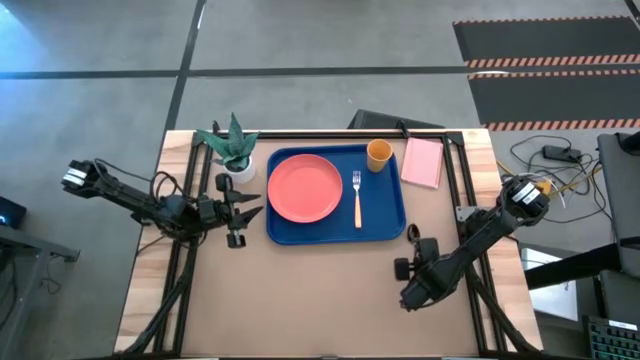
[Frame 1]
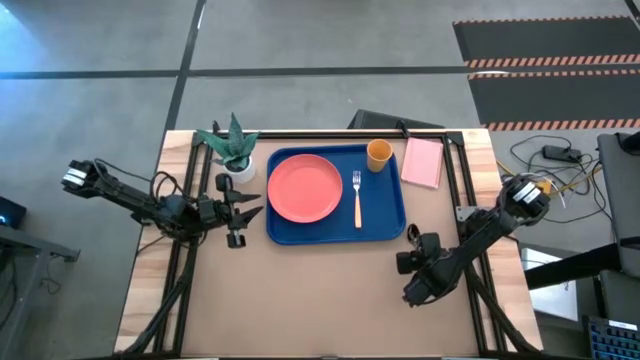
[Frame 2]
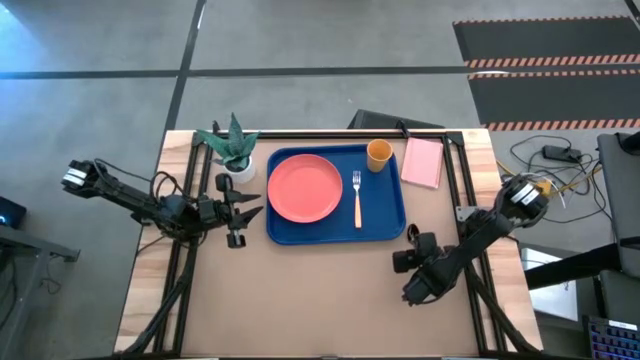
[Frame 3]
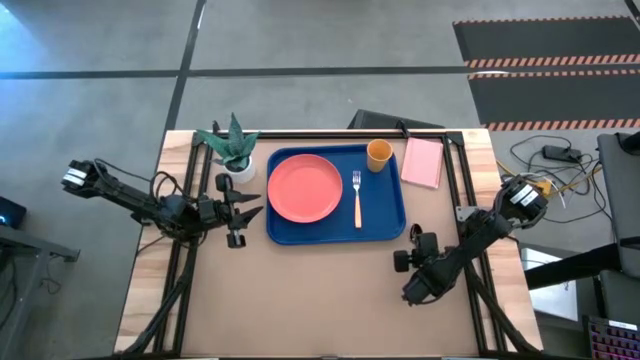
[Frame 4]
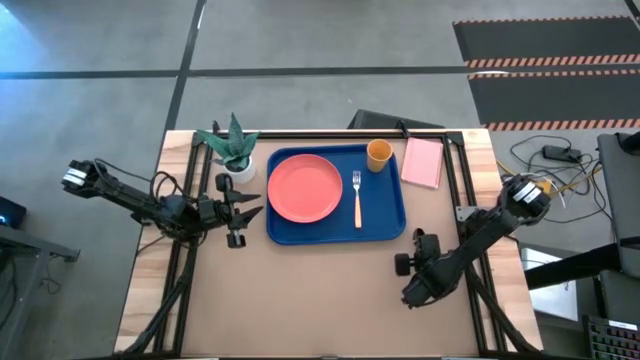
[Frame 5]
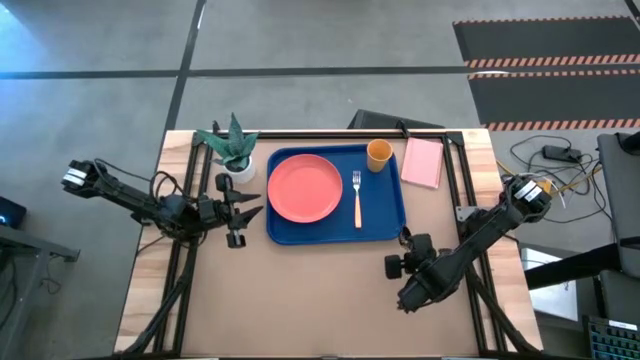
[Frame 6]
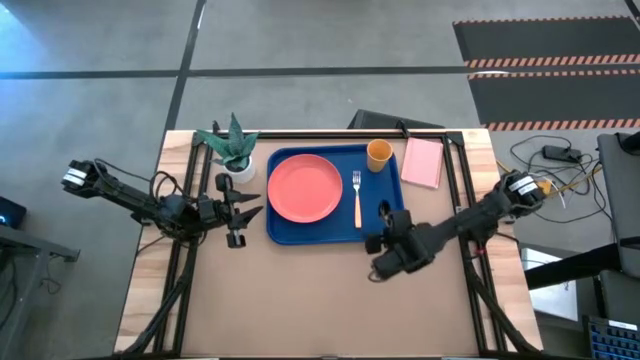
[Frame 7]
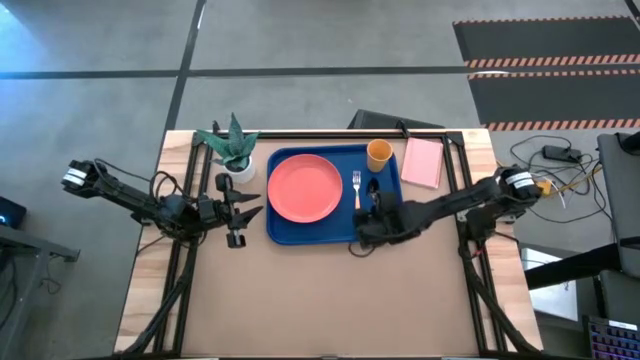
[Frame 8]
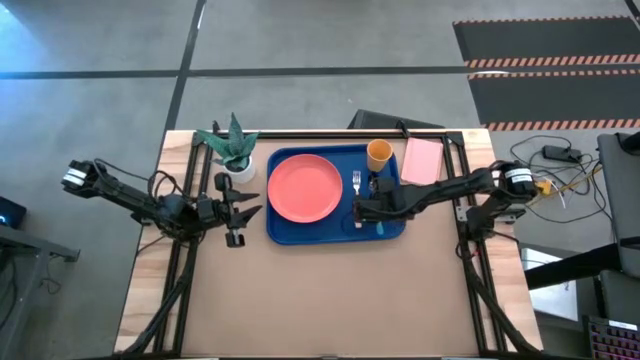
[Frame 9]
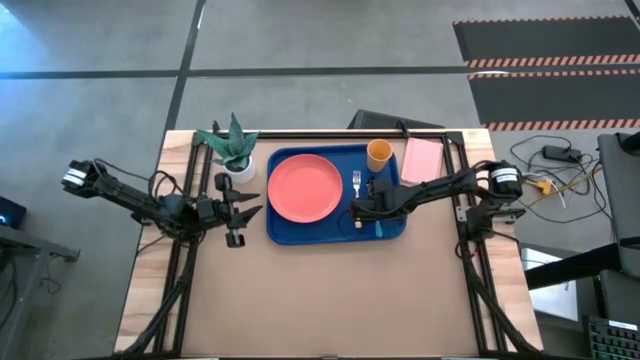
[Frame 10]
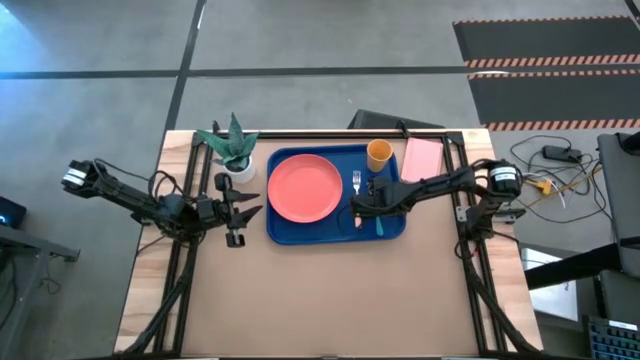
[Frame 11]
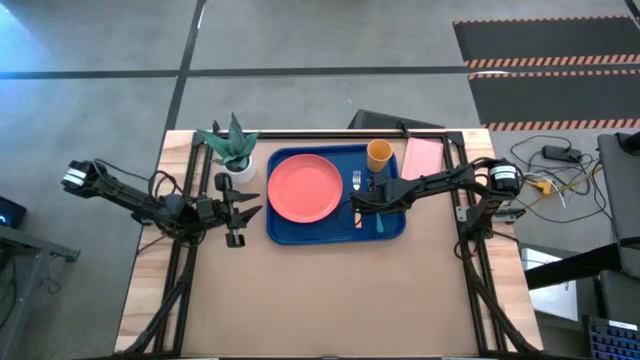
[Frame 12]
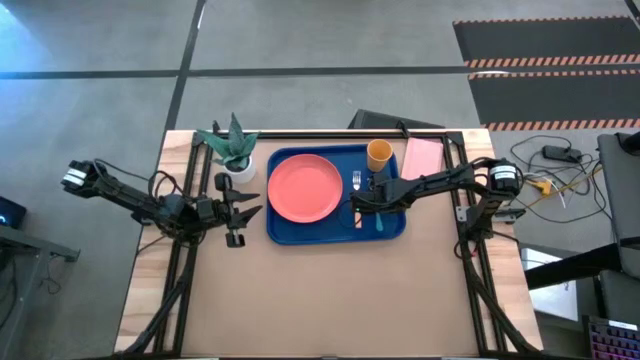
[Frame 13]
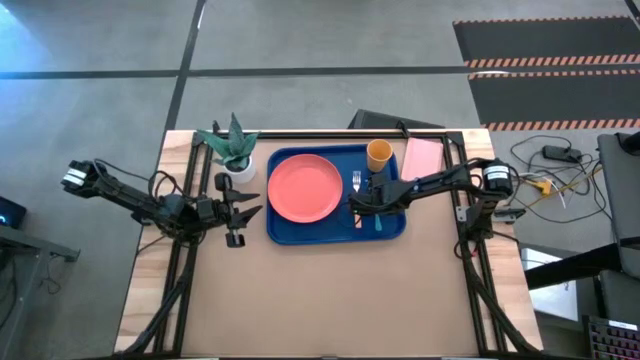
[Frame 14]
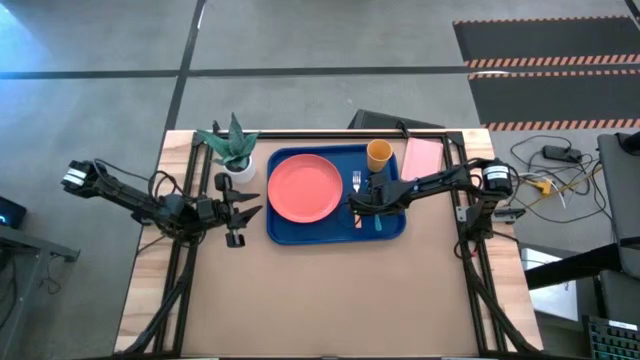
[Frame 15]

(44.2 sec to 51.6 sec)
Task: Pick and place plate/cup/fork/spoon on tray
Put the blue spoon on the blue tray on the right of the yellow fork

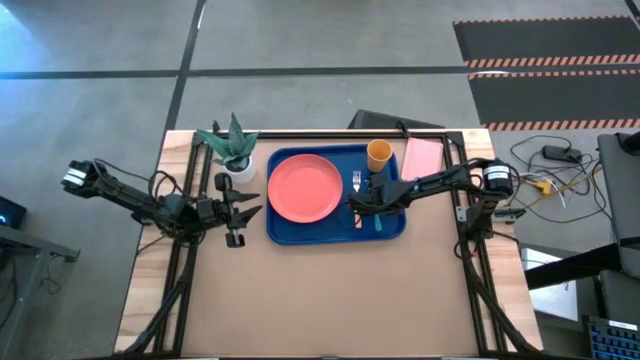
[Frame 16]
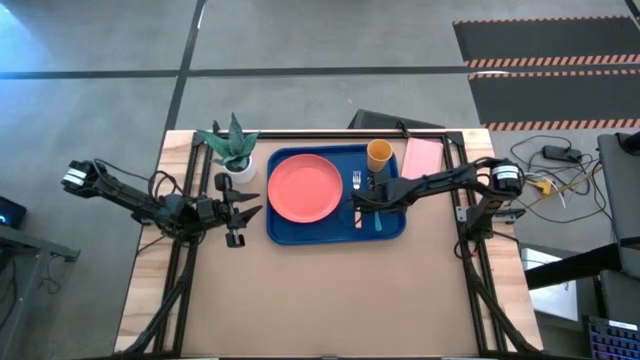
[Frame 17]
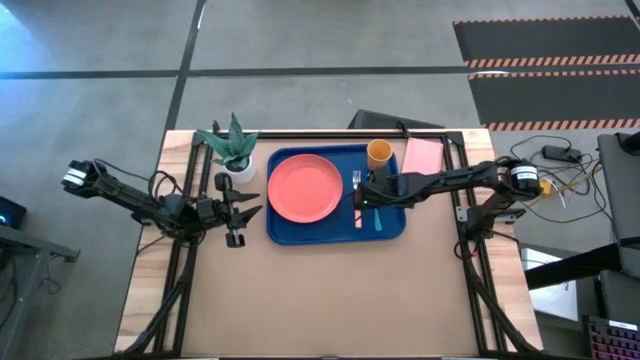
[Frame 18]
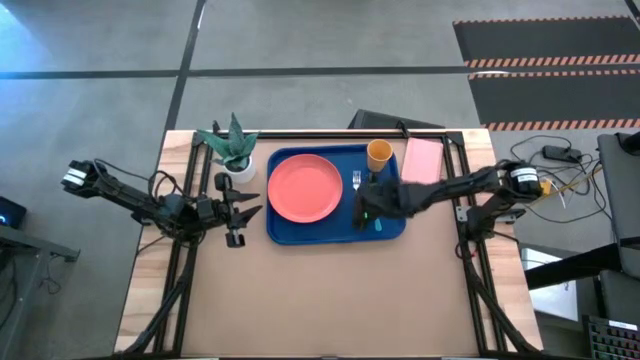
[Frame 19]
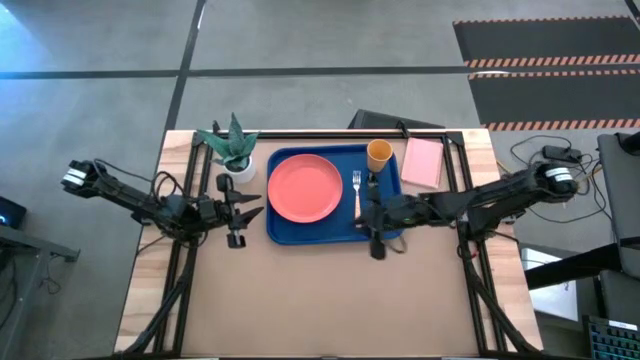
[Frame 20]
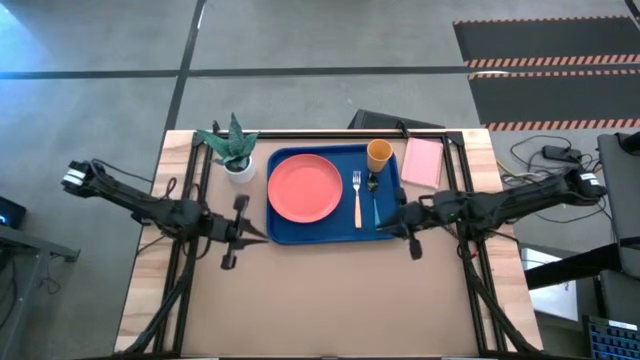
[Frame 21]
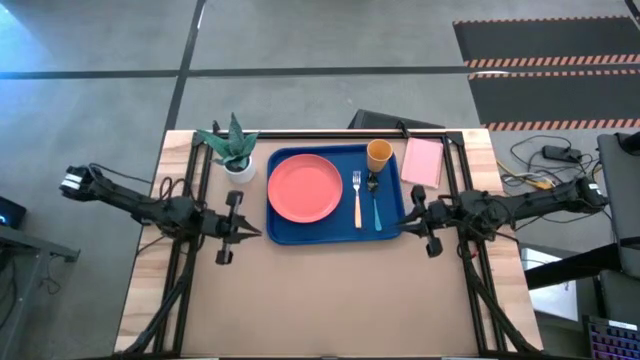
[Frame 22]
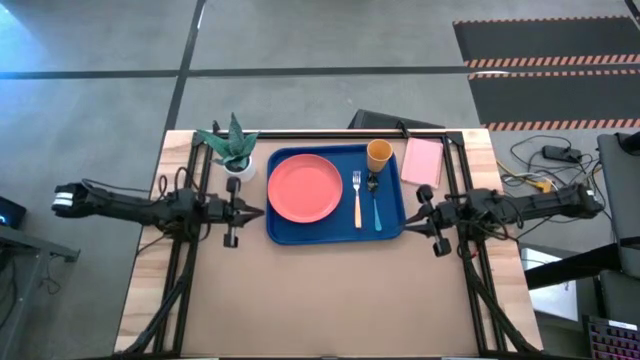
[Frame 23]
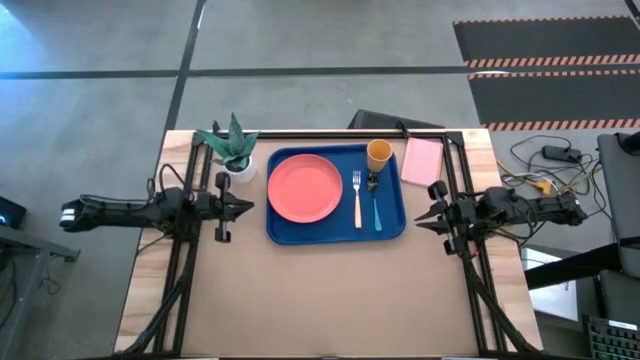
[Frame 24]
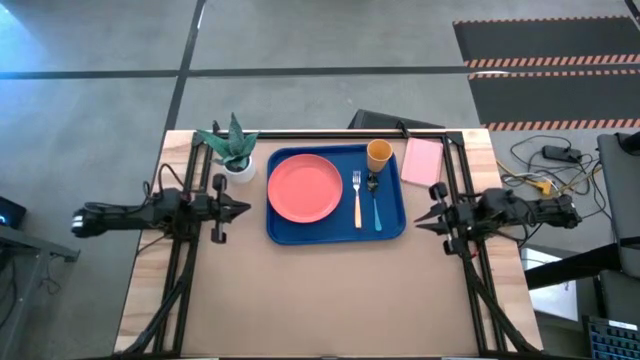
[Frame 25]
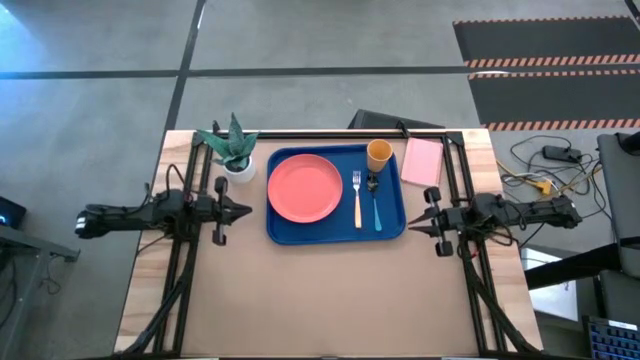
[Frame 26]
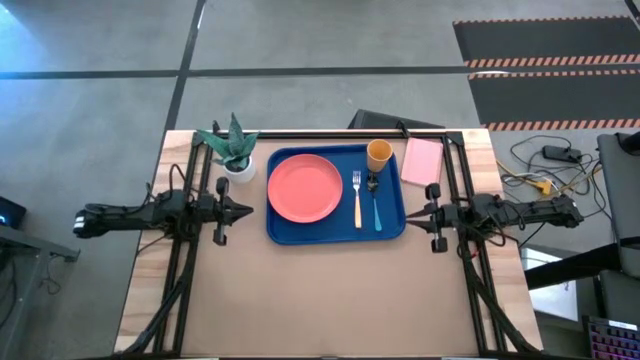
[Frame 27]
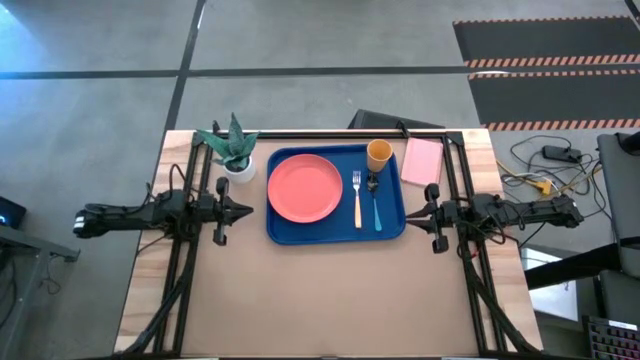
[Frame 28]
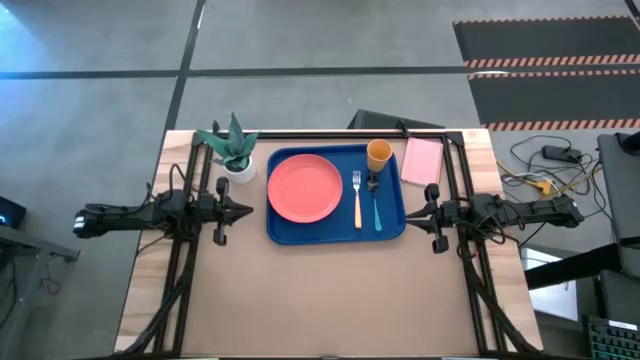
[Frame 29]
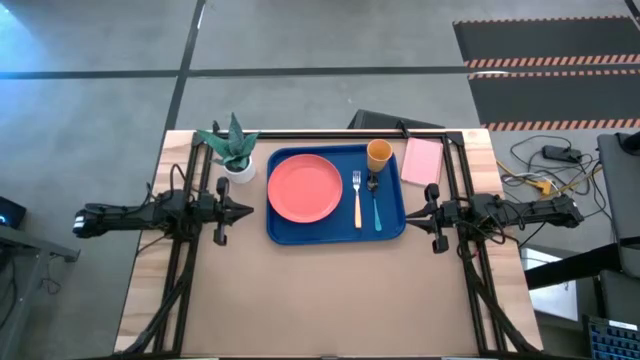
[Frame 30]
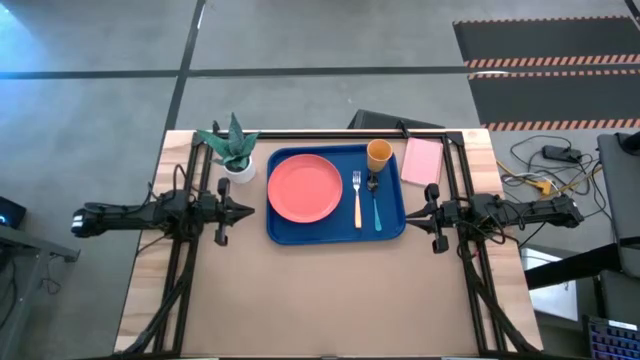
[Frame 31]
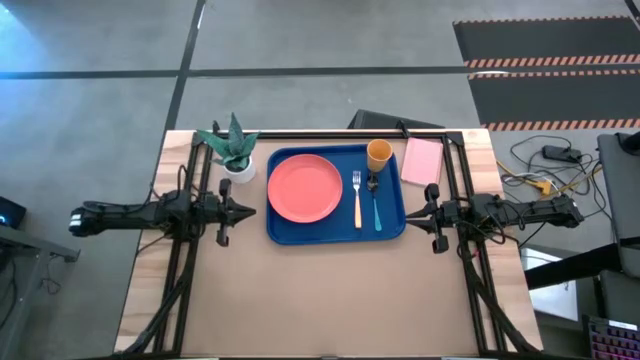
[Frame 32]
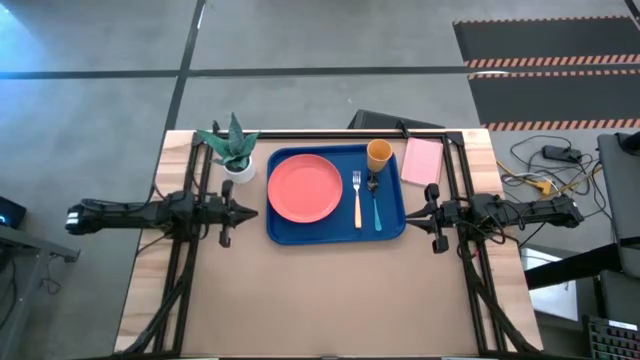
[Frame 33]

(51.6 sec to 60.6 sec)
Return to Home Position

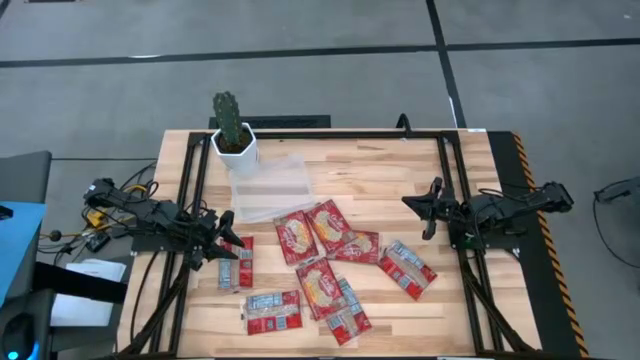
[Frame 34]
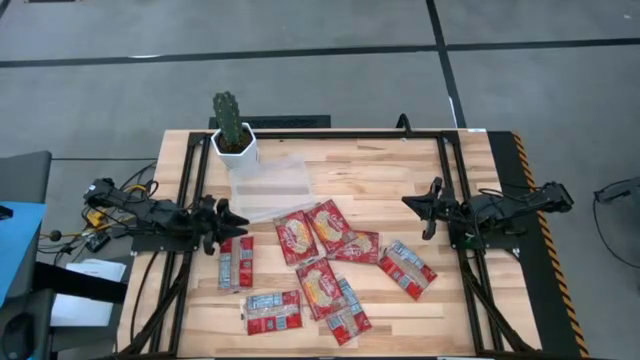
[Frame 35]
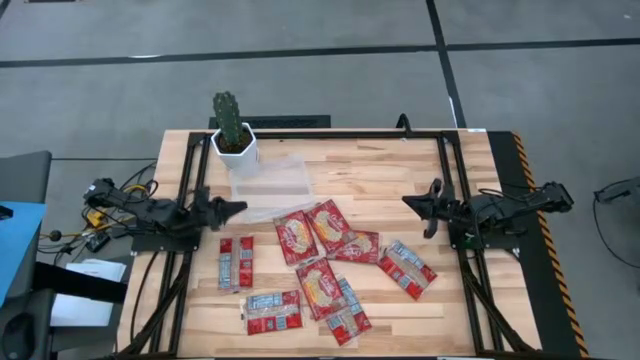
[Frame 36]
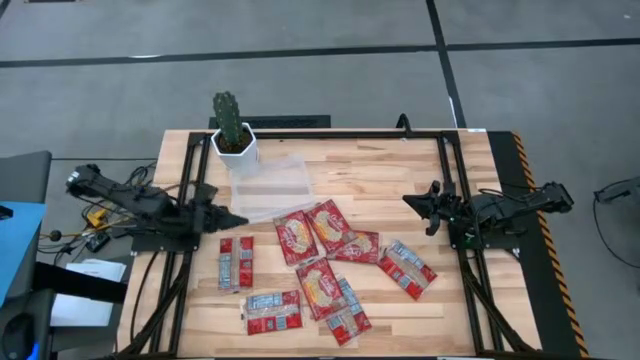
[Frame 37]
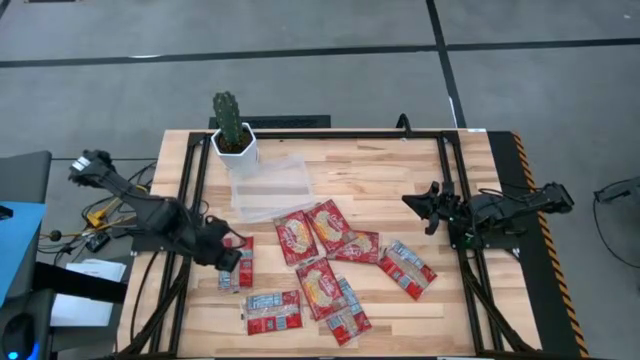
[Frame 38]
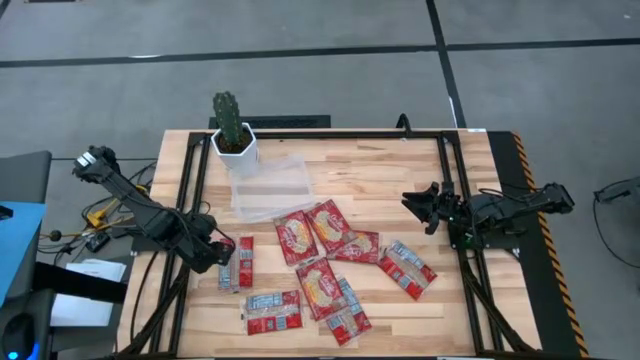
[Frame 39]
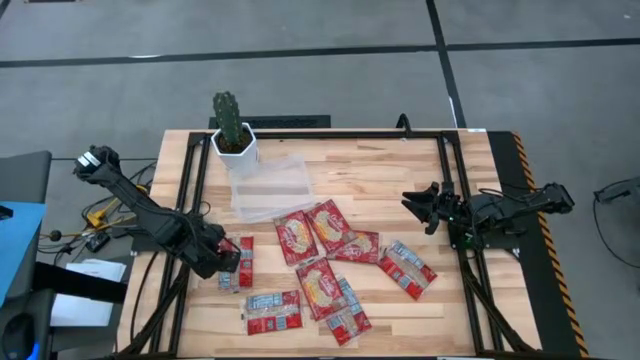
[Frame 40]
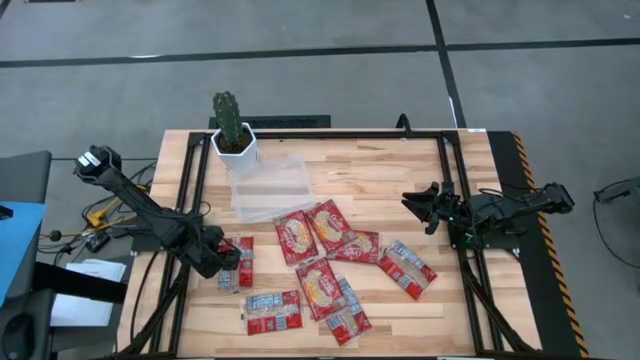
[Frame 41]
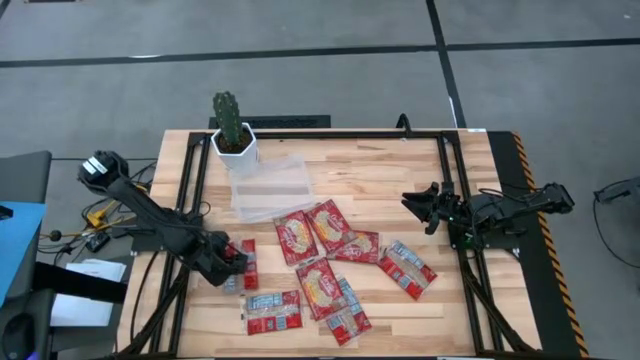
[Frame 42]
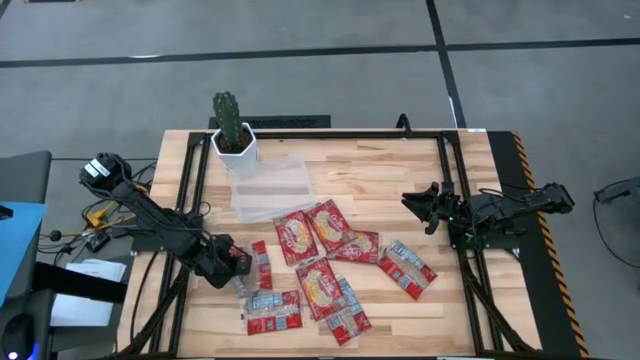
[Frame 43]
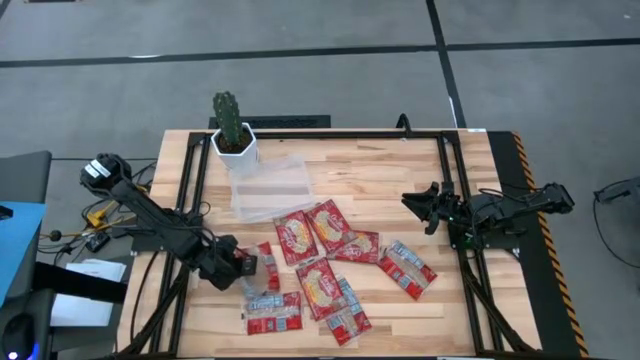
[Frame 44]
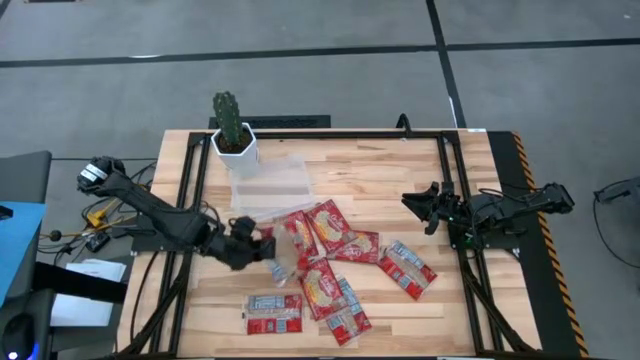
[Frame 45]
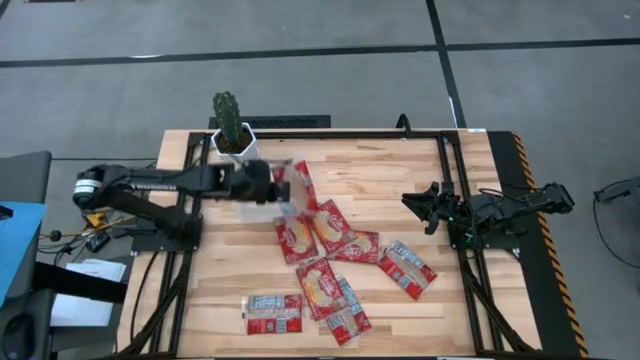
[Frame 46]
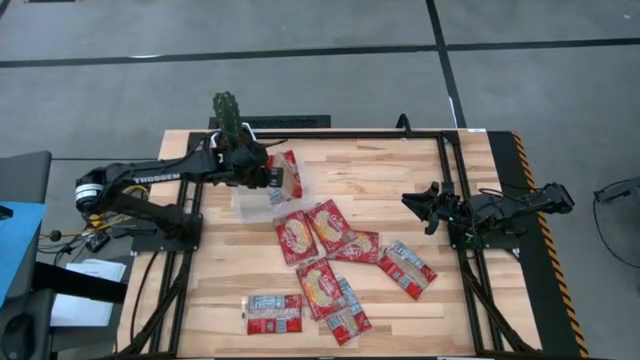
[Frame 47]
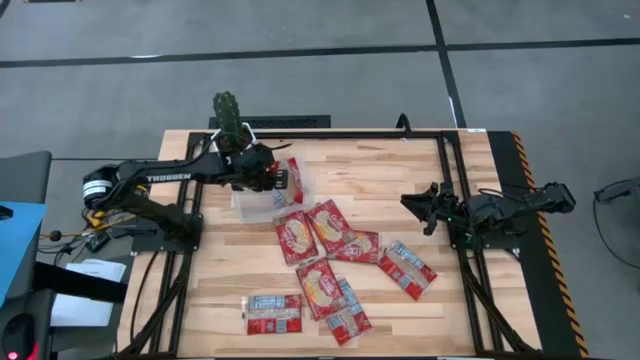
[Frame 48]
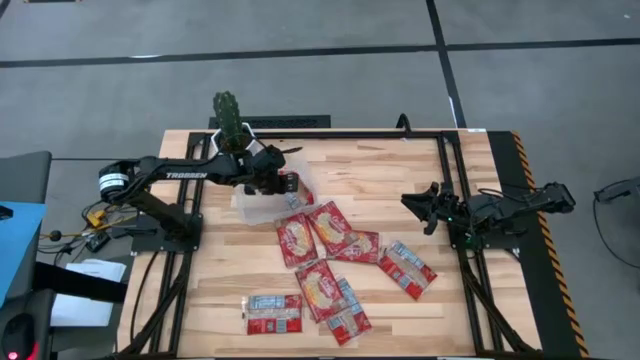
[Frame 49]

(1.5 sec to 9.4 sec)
Task: Sort popcorn bags into baskets
Put the red popcorn bag into the transparent bin
